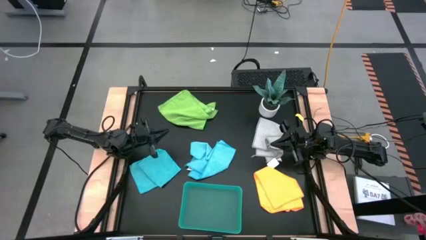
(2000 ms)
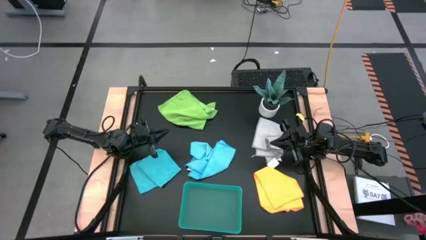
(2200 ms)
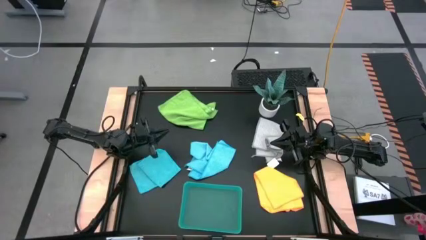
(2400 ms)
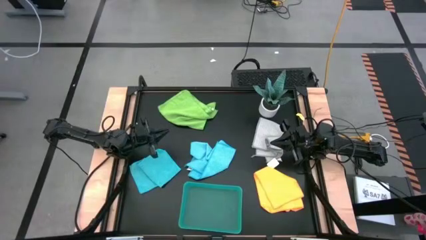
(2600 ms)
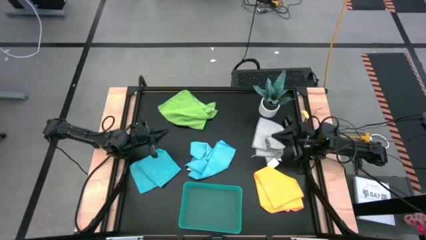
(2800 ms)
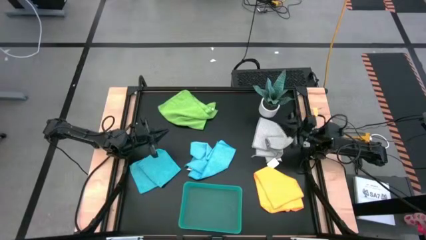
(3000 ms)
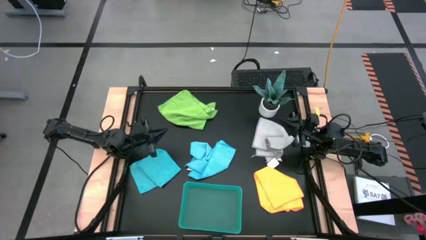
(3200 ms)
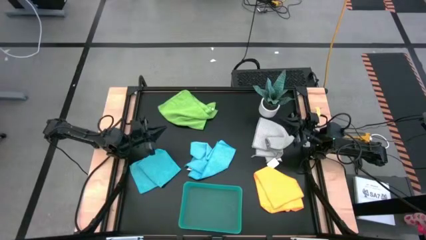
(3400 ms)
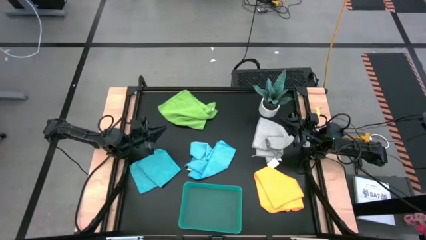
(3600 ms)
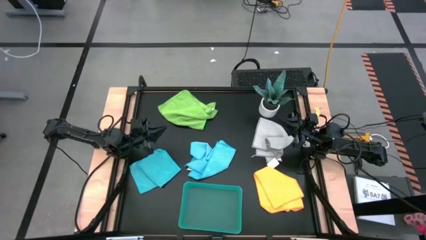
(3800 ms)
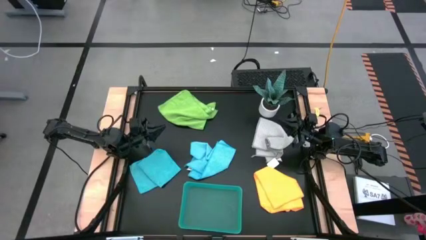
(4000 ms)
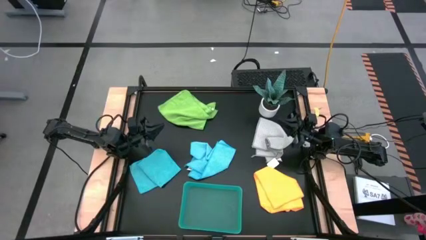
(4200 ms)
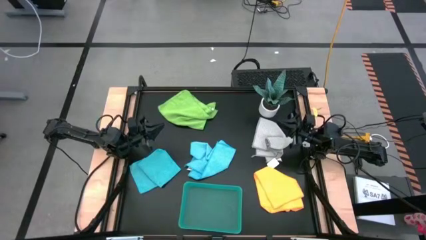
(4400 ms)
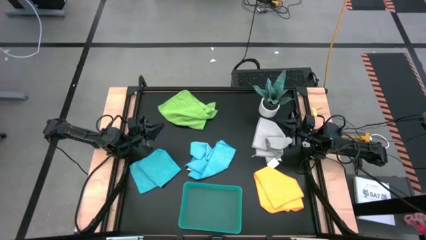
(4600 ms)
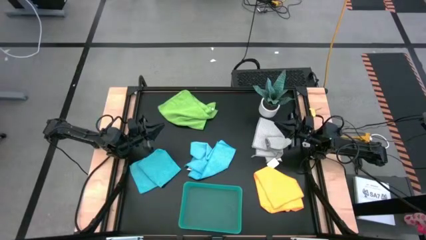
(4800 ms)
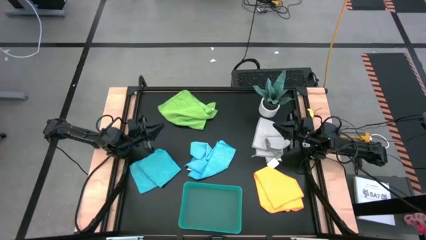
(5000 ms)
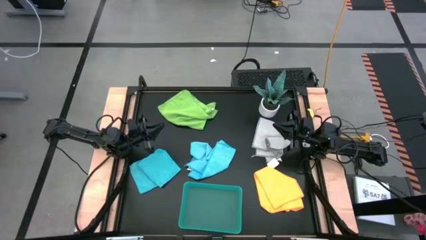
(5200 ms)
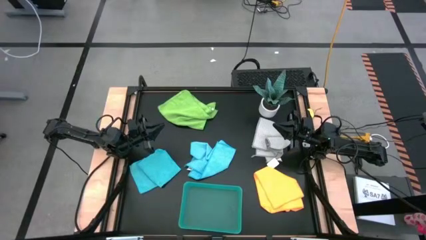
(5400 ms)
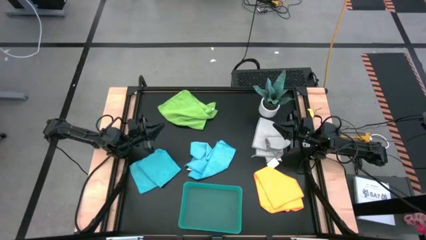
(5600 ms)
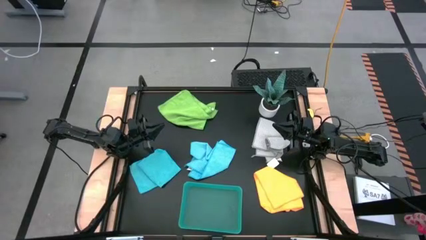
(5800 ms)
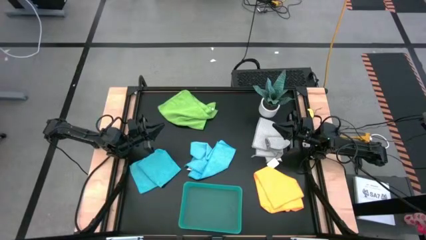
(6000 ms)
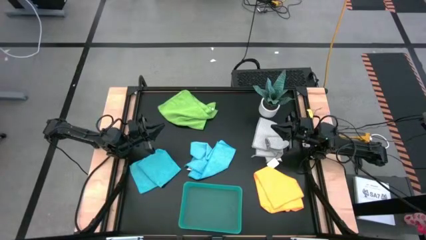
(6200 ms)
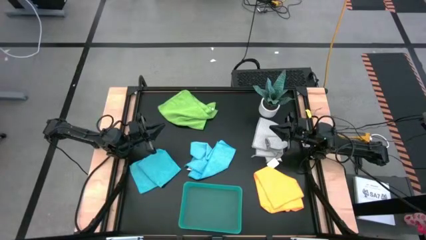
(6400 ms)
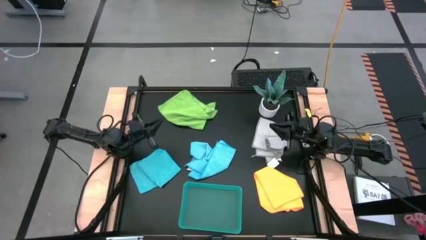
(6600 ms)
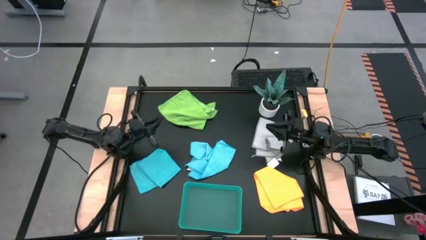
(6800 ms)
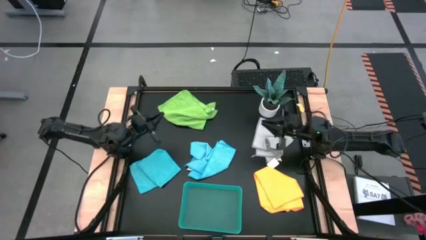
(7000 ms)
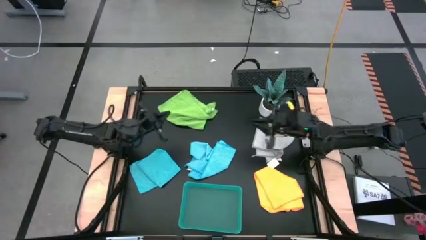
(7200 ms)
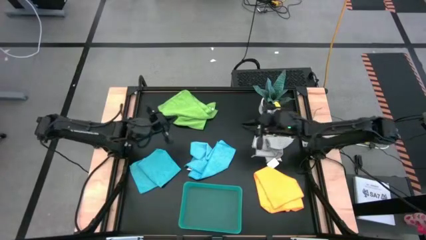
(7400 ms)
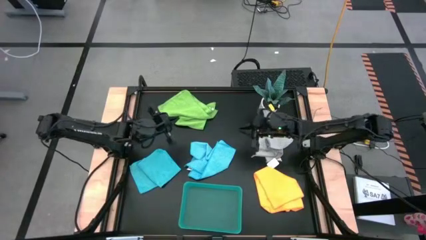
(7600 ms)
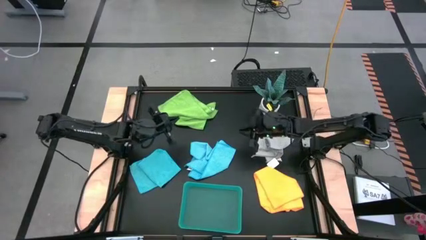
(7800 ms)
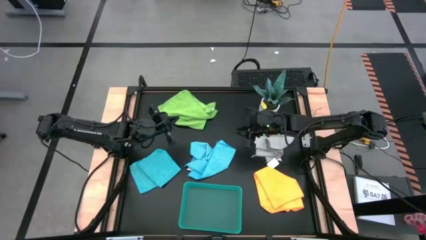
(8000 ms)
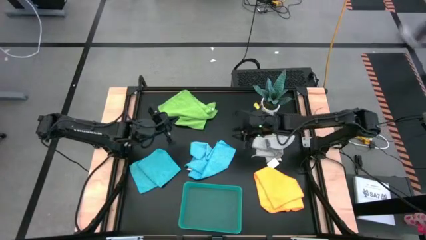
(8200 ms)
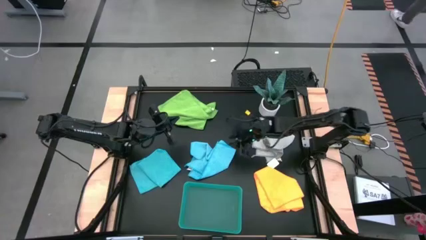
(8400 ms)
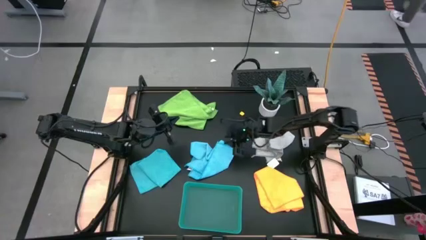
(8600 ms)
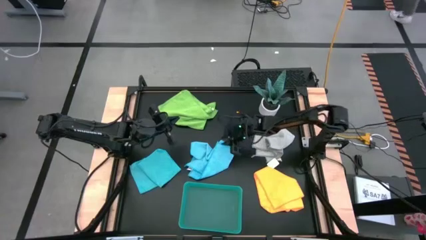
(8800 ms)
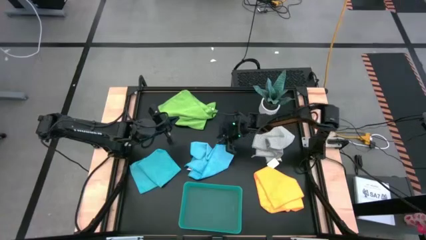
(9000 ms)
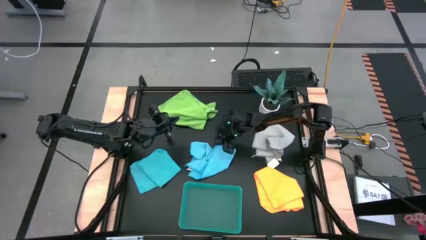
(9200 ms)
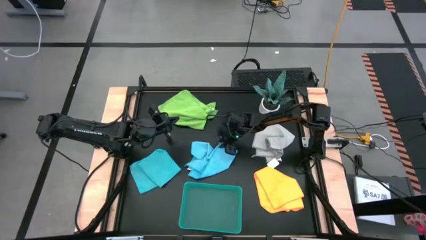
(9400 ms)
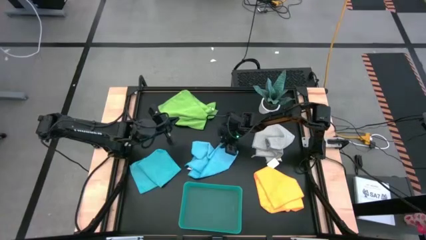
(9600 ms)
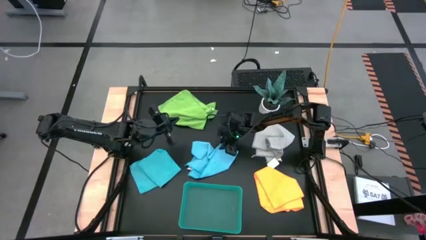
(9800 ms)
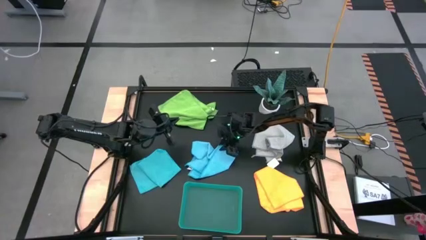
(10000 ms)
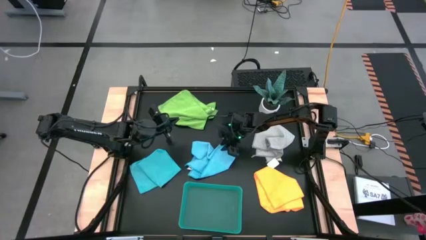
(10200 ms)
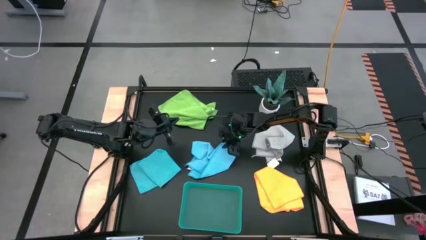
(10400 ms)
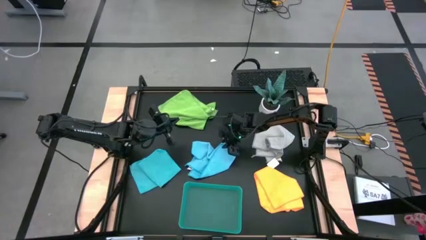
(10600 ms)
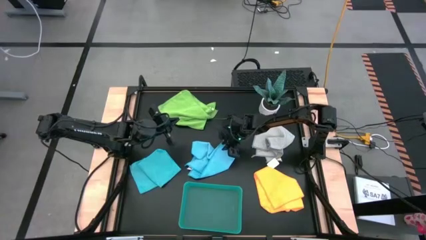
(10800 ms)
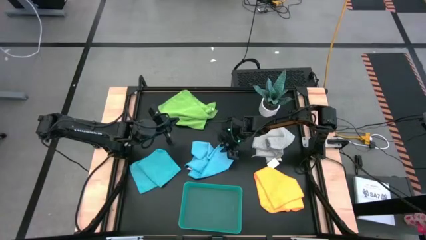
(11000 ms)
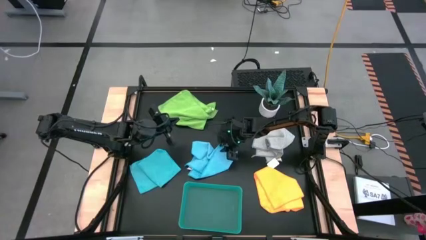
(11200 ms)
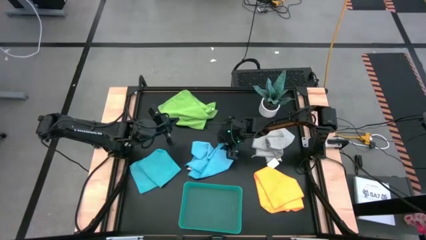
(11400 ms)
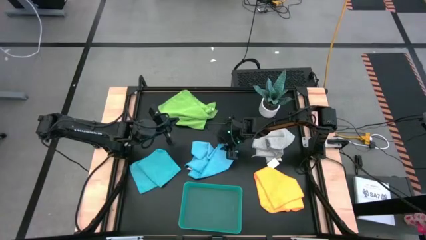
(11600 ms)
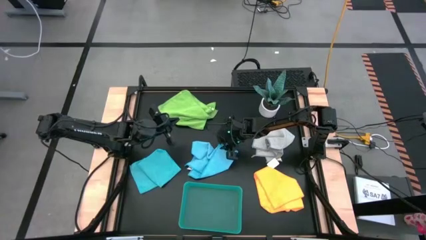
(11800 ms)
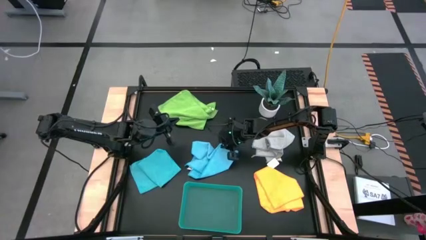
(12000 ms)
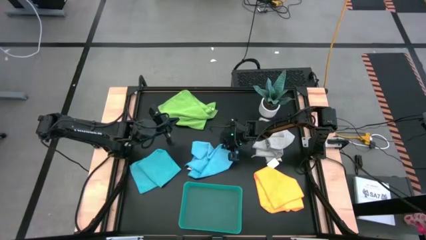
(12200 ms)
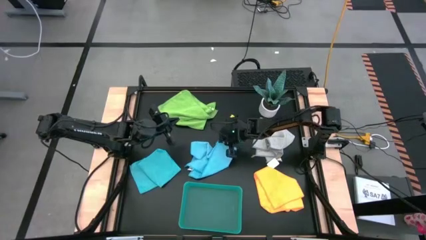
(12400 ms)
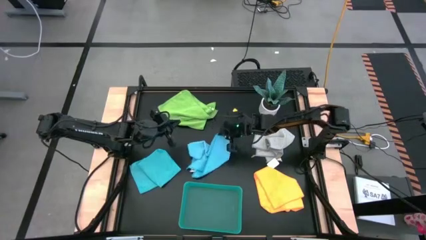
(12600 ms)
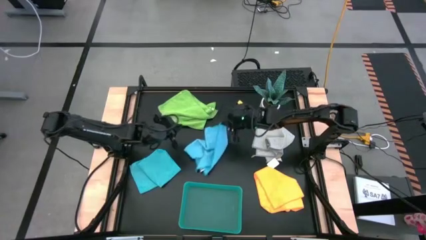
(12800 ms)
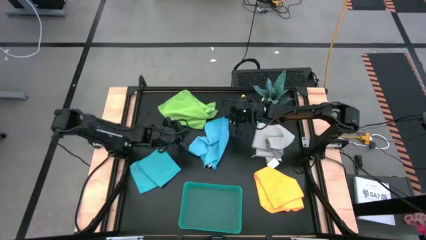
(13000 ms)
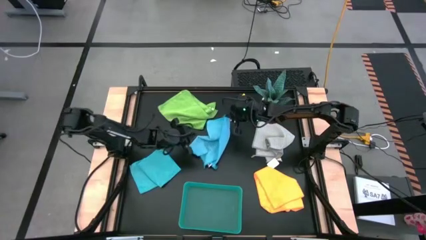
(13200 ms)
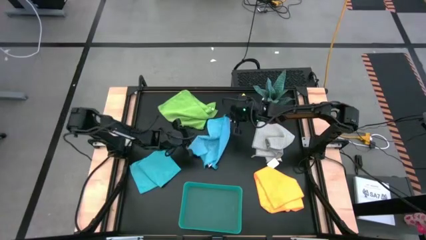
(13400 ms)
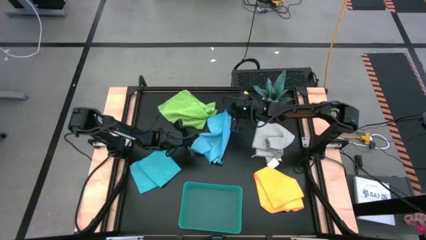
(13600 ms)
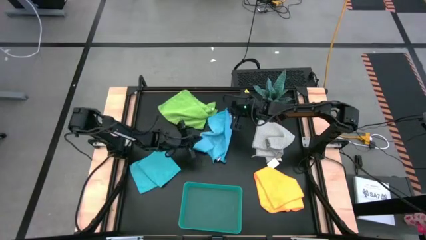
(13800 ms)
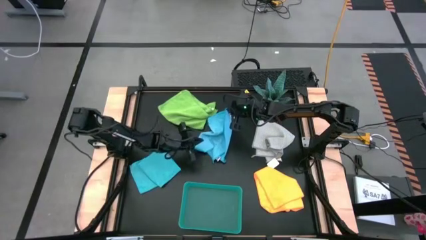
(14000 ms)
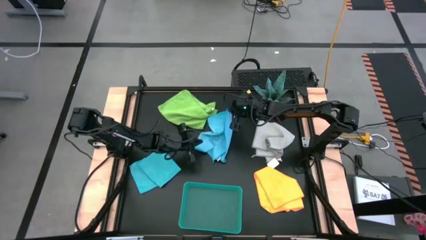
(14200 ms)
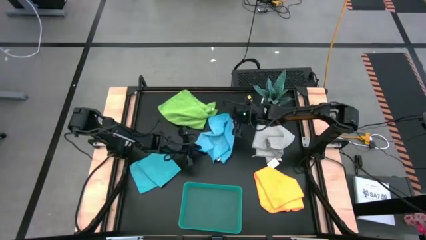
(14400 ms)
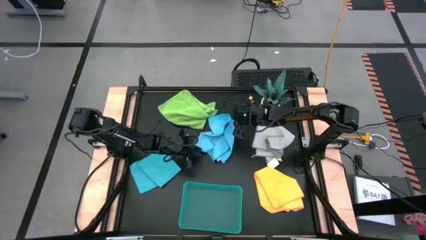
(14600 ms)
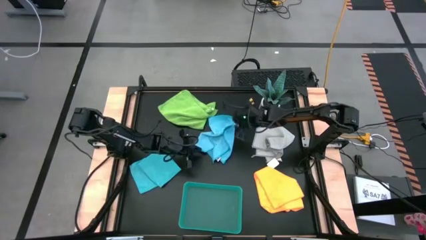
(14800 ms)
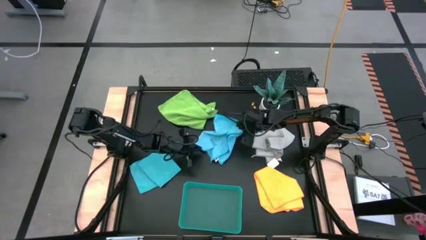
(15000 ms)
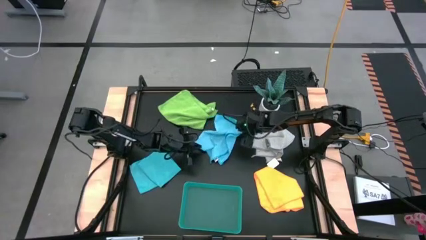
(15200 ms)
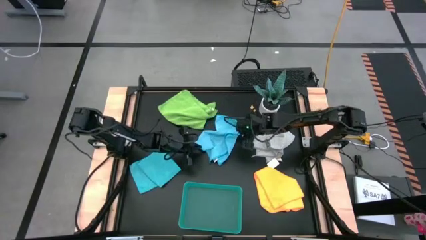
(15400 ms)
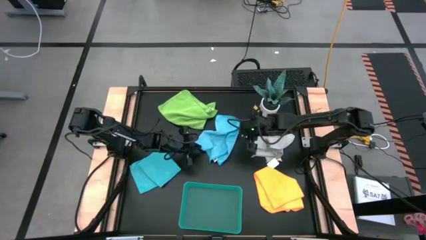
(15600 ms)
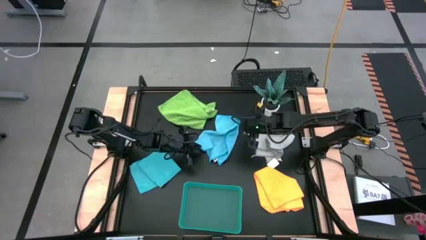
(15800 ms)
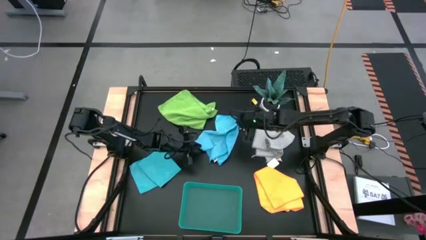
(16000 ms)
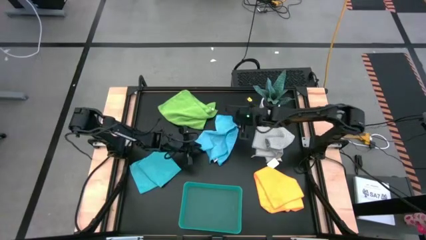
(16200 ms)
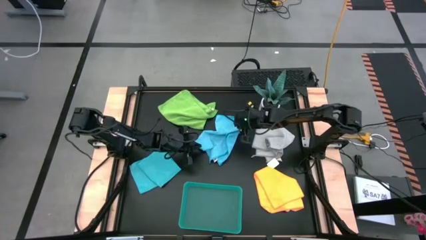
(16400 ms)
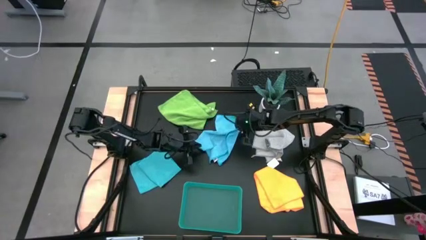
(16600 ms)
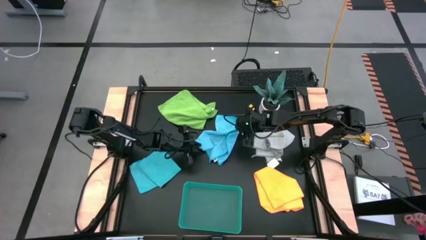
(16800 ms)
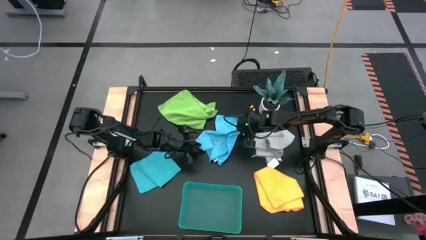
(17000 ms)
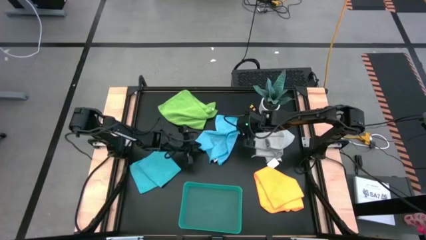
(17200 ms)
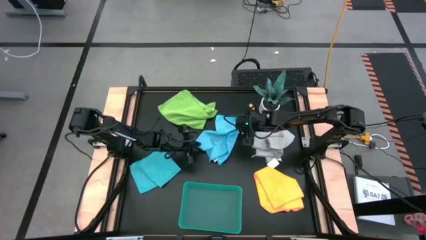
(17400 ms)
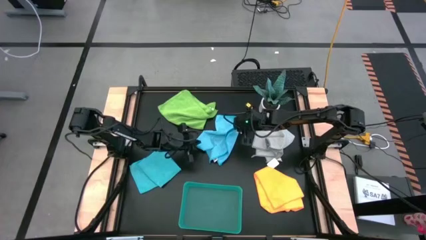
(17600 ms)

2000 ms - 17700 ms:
Task: Fold microfiber towels
Fold the right blue microfiber cloth
